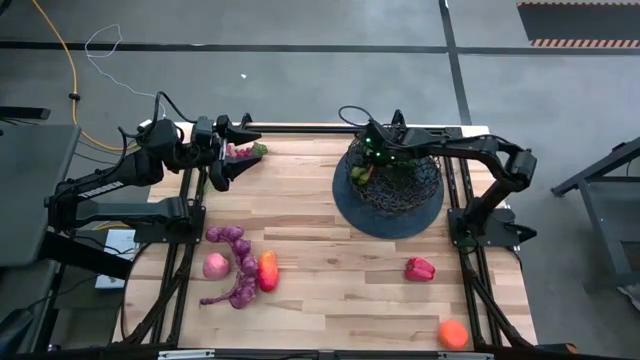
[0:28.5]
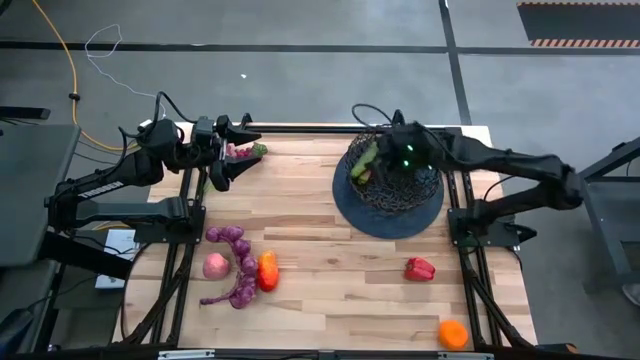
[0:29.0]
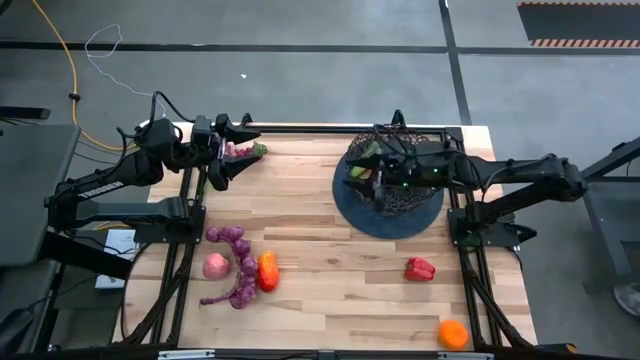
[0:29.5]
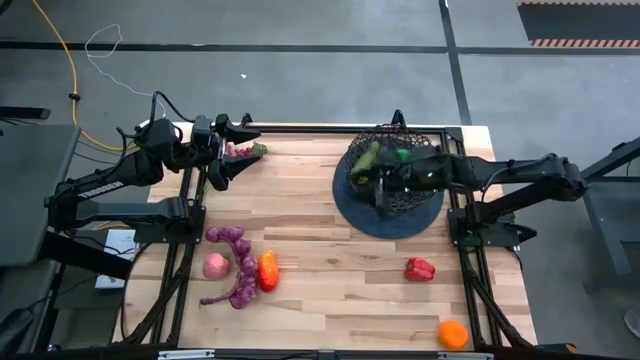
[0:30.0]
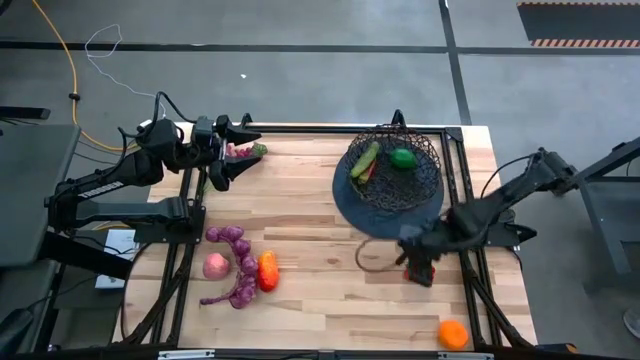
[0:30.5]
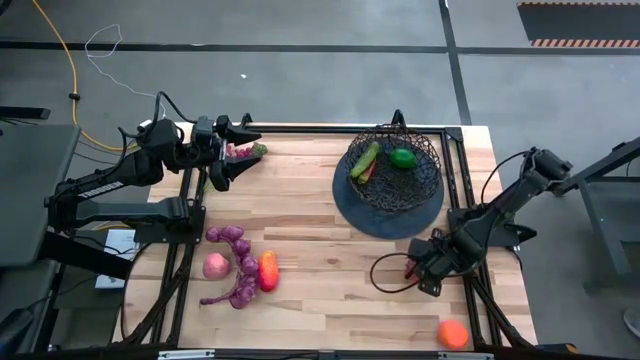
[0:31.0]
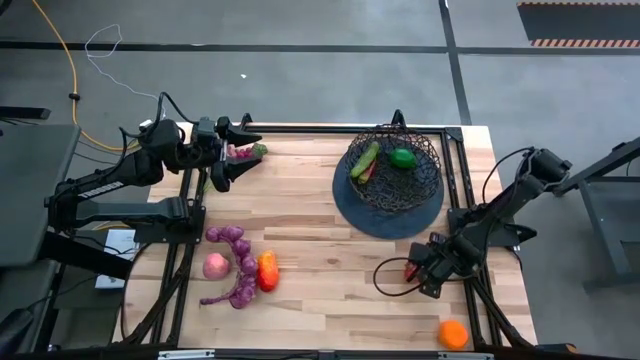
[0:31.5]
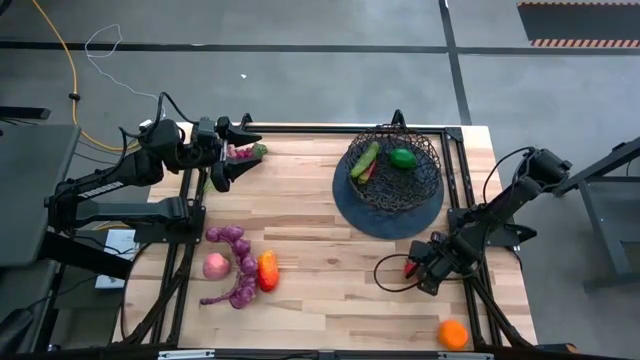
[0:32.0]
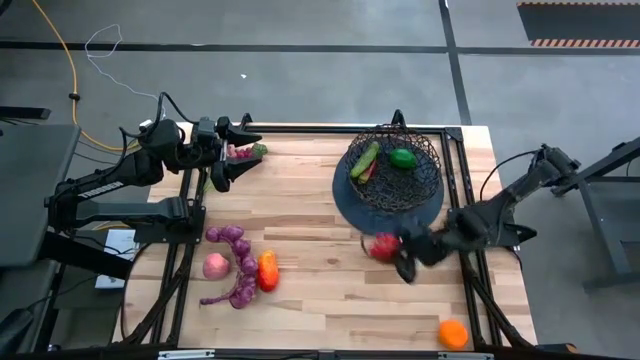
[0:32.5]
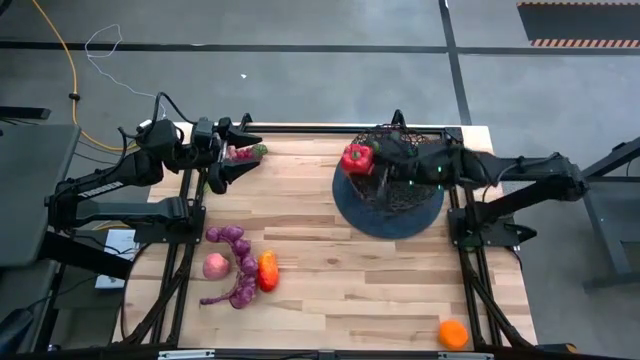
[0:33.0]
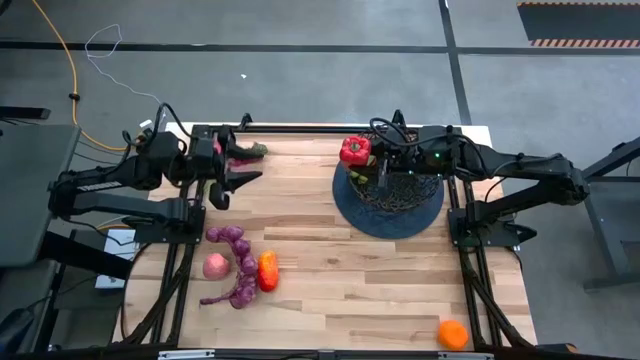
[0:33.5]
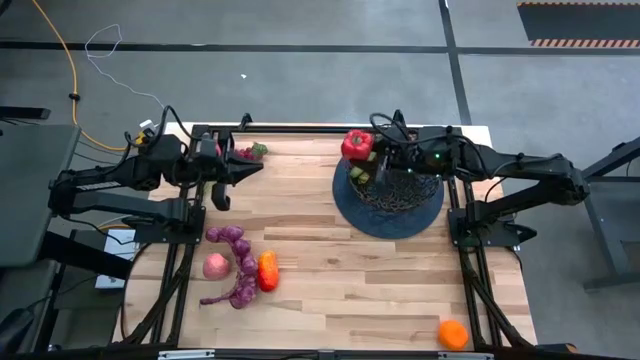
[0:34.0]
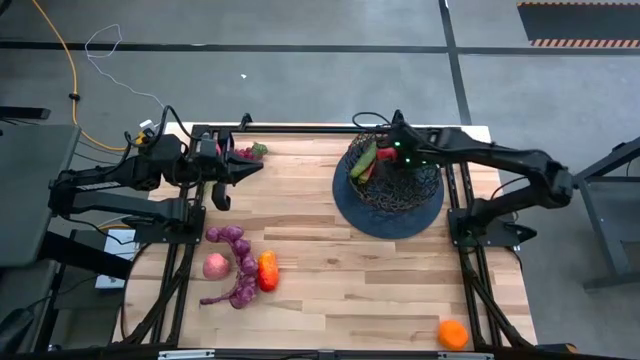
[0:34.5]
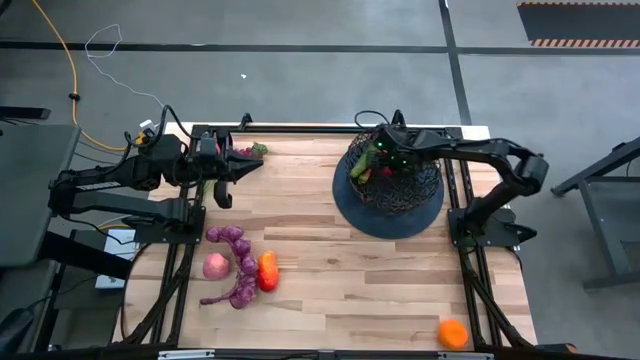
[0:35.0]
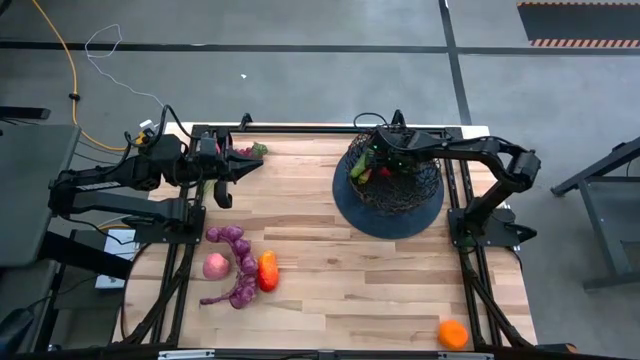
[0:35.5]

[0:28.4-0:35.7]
Task: Build produce basket
Put the bell pepper into the wire basket

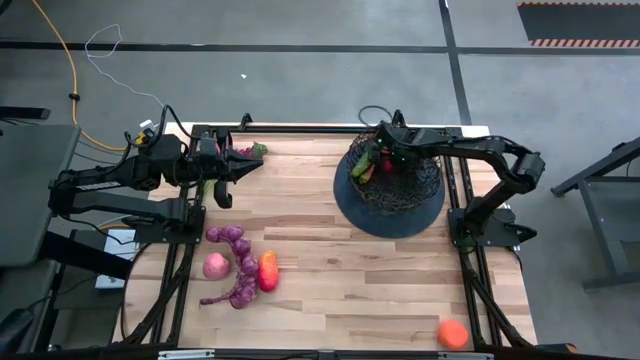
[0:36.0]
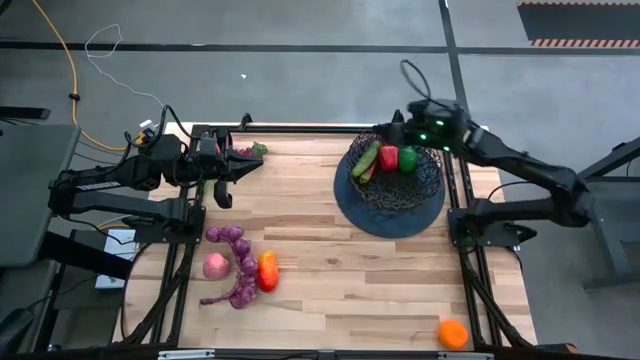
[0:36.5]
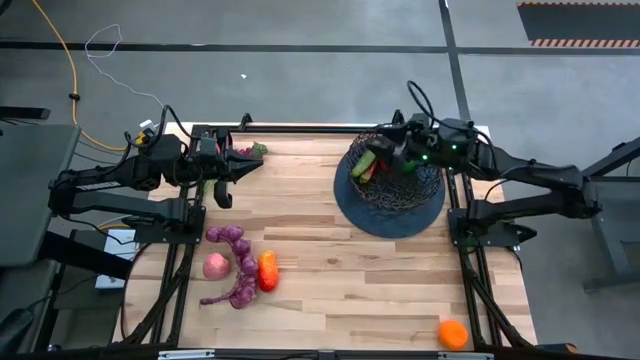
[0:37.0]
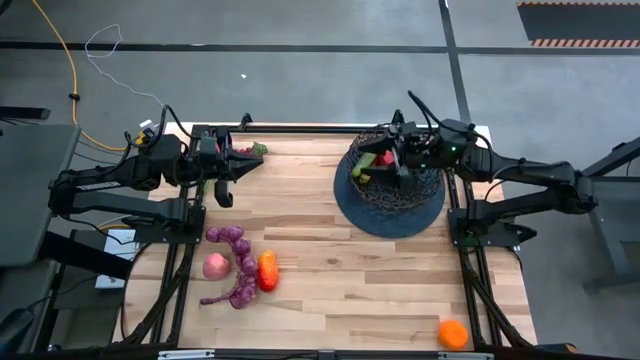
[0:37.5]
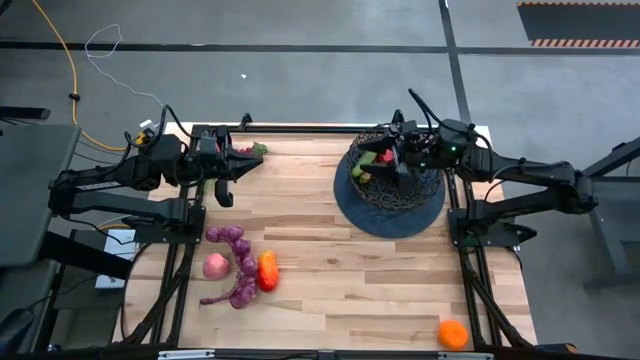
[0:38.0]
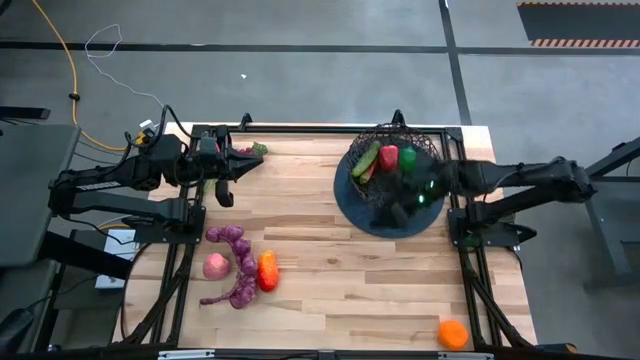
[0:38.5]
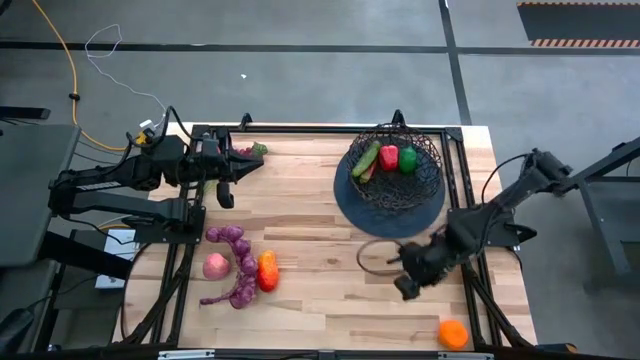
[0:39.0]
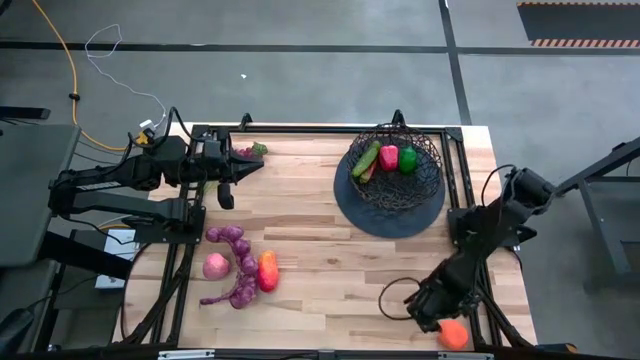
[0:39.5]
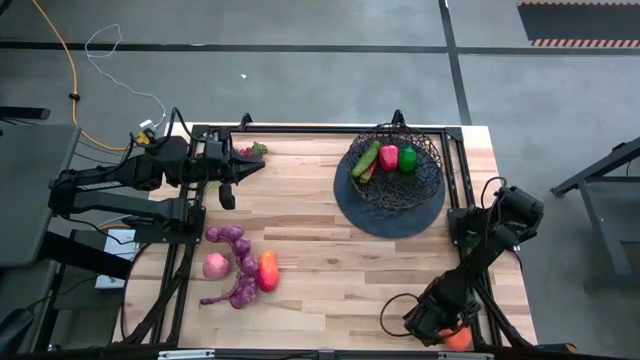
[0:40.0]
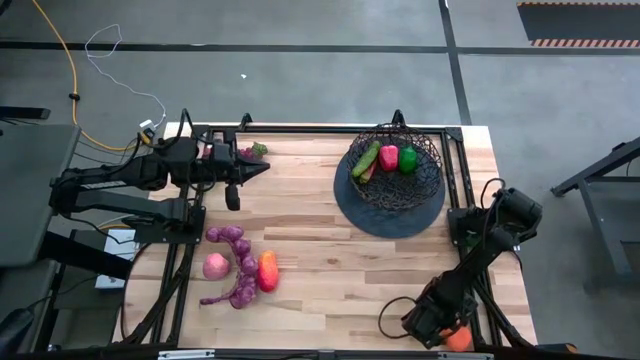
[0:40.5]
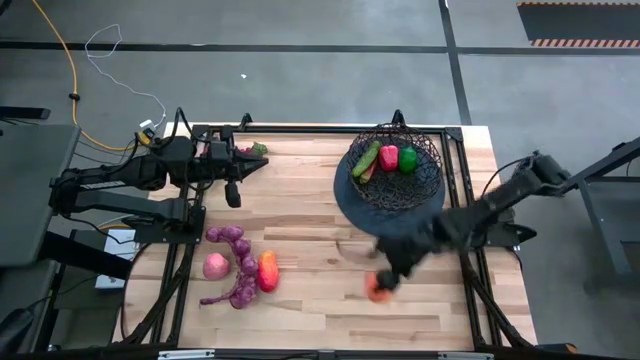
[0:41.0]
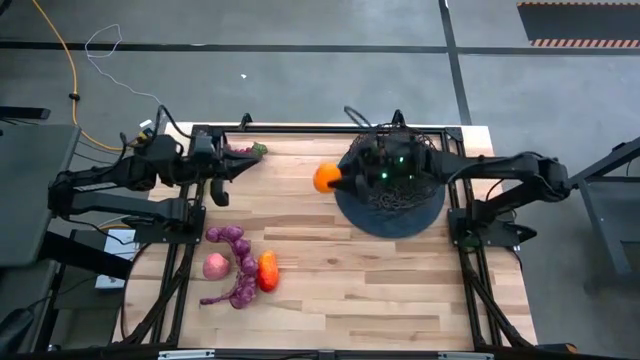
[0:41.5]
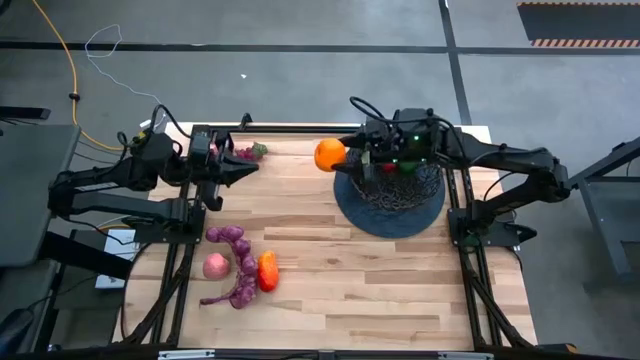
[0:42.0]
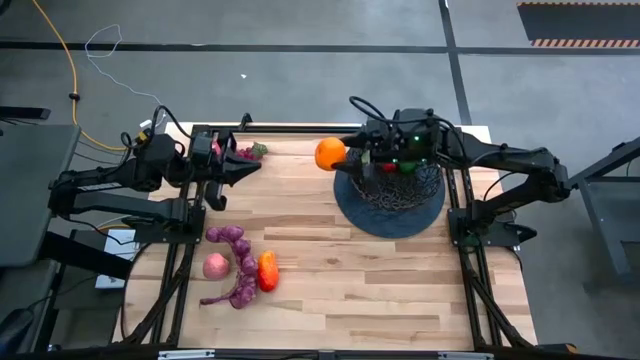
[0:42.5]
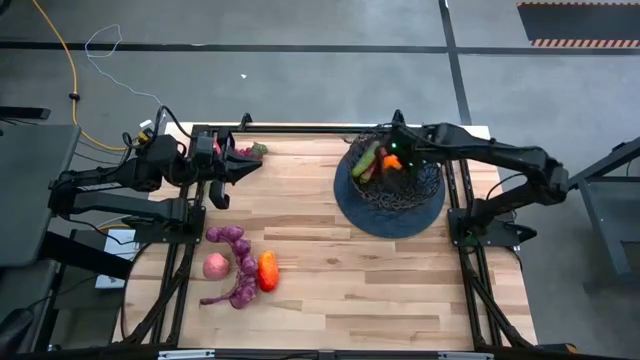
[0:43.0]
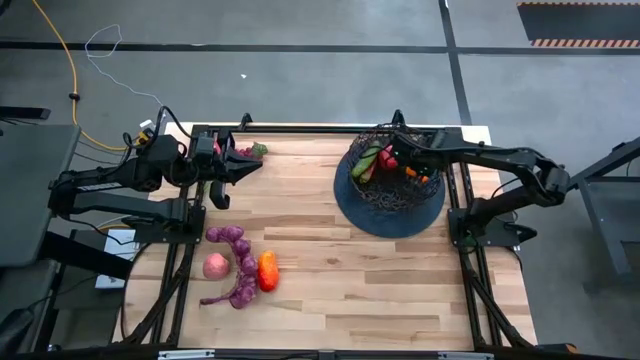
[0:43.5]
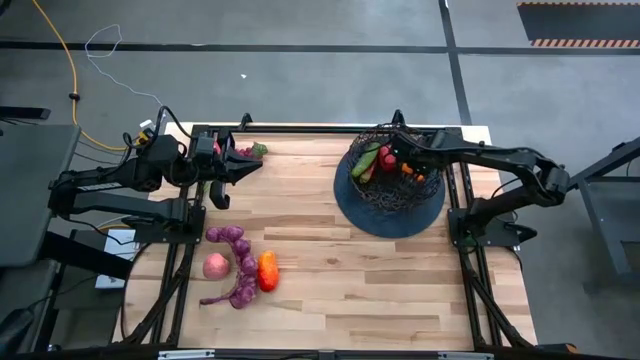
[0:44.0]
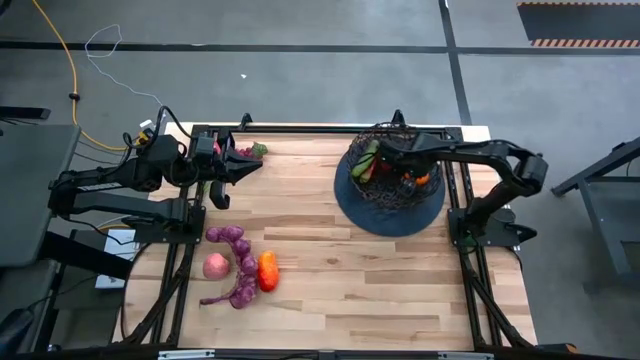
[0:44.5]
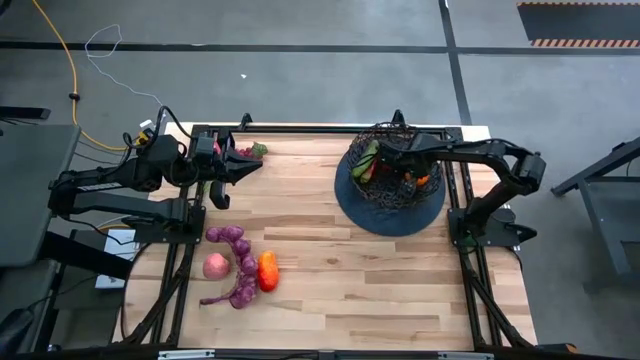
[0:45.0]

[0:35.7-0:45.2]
Put the orange into the wire basket

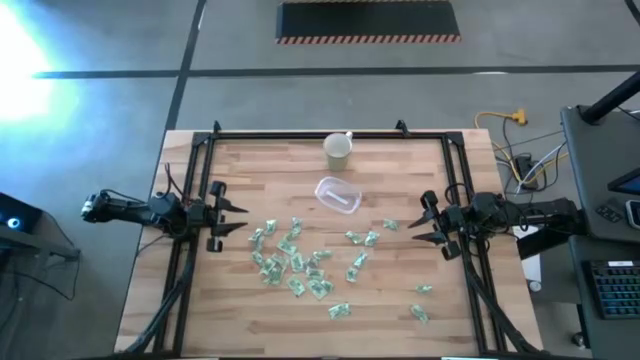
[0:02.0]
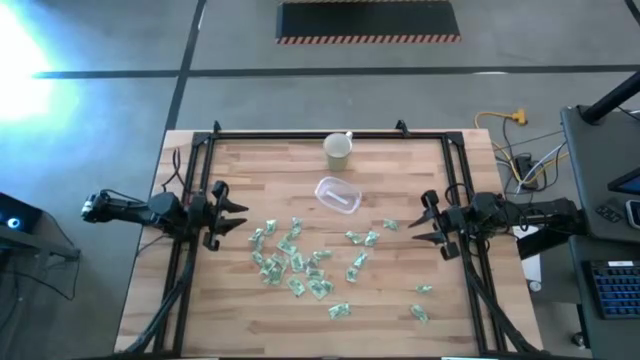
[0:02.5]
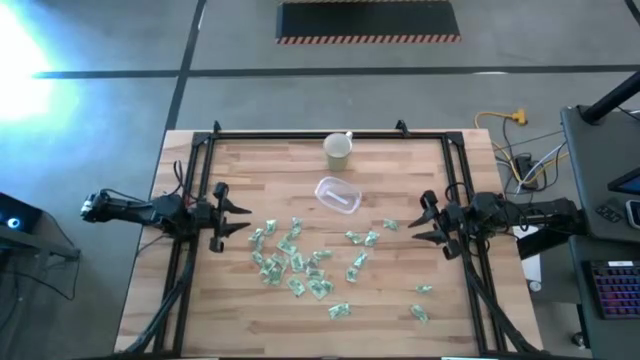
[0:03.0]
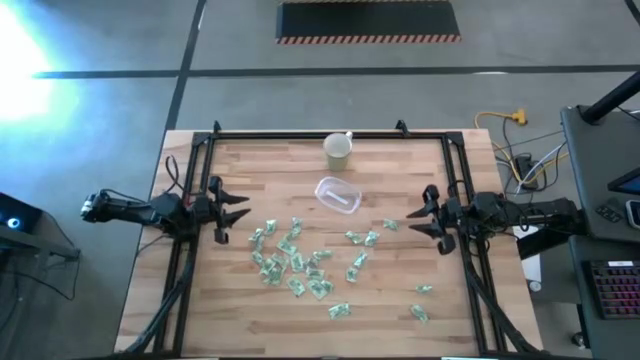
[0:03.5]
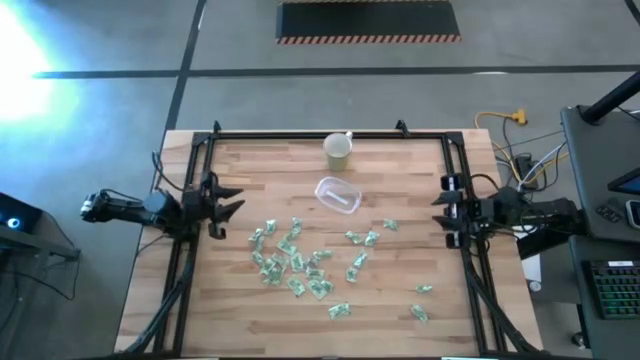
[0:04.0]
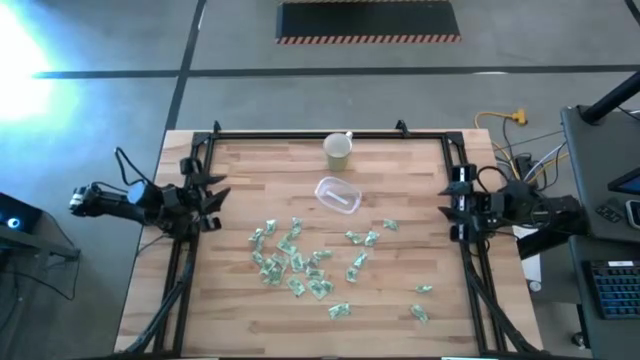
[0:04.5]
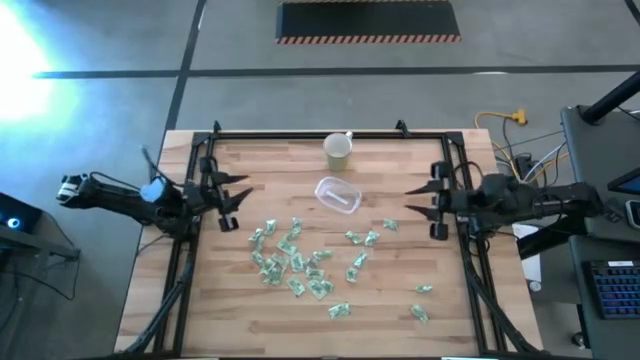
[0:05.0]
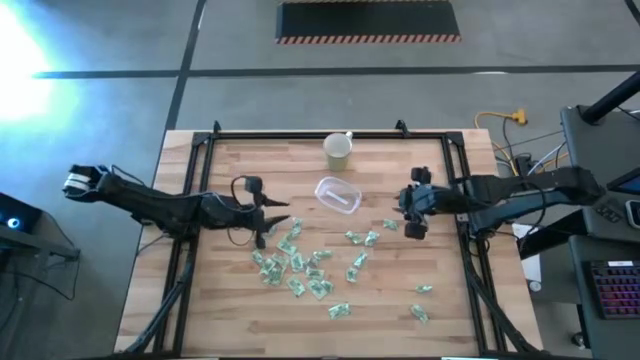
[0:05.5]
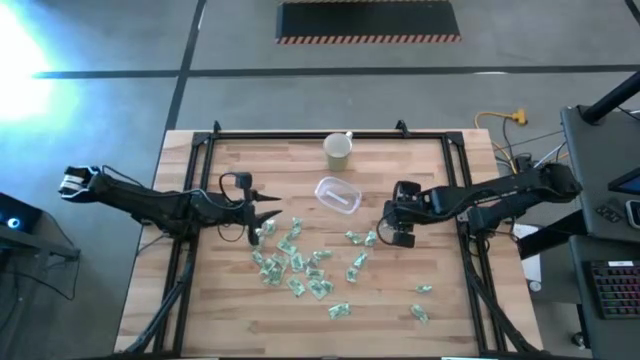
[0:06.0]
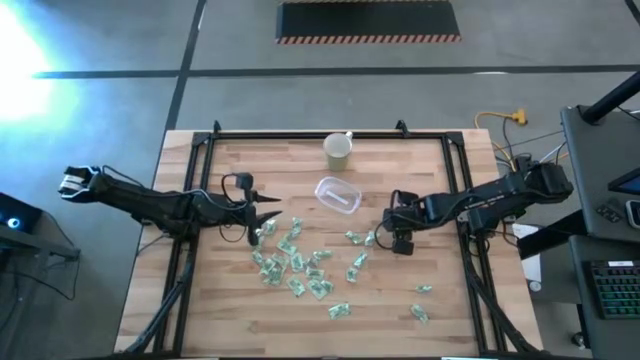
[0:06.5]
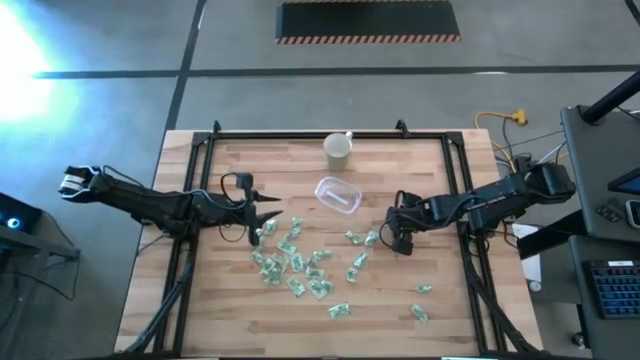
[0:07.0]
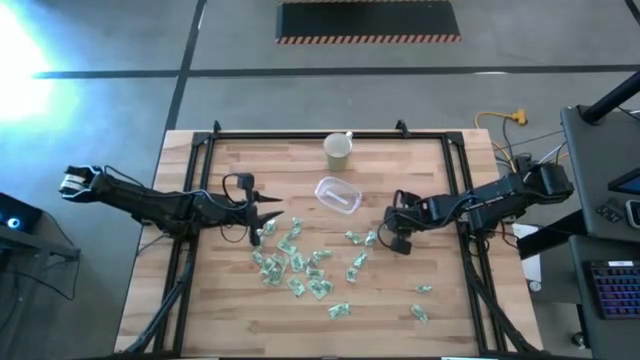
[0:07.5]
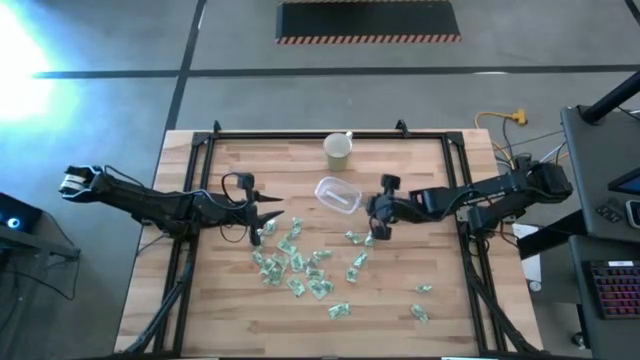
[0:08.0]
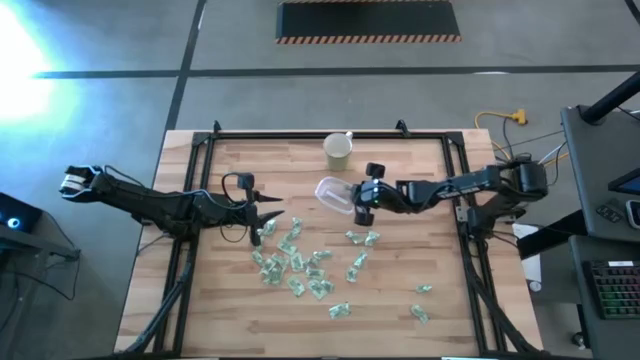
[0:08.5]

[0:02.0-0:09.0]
Task: Pick and place items into bin
Put the green stevia packet into the transparent bin
